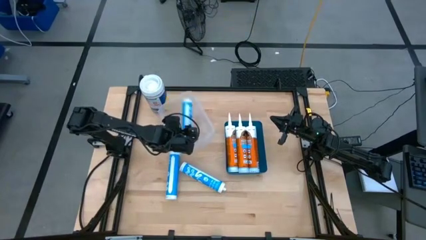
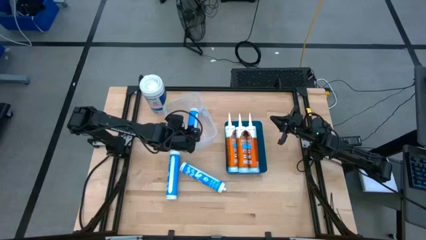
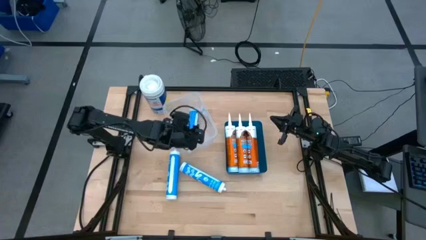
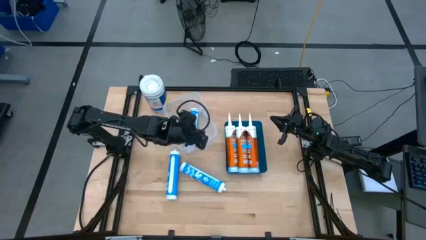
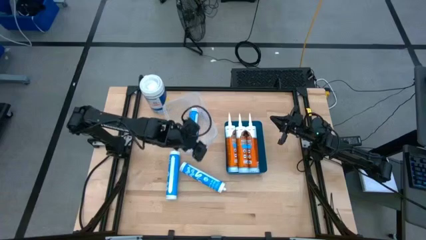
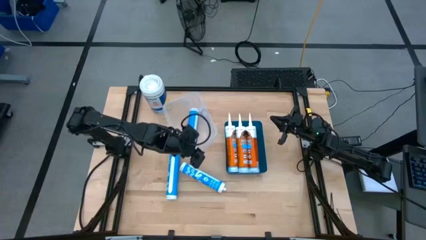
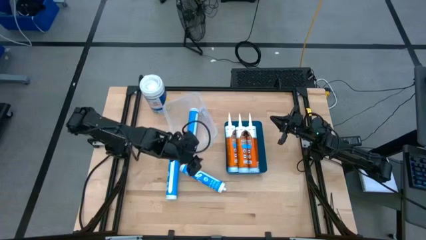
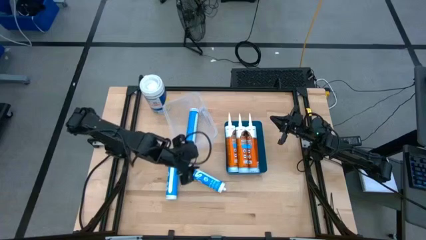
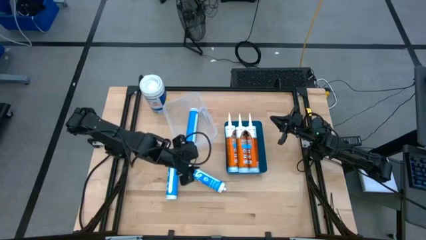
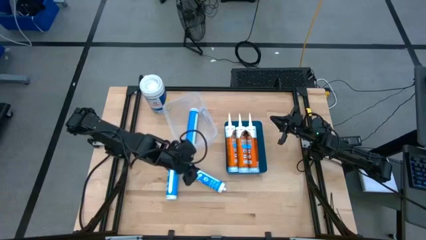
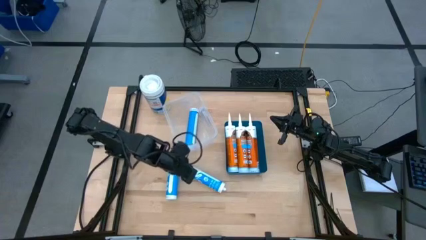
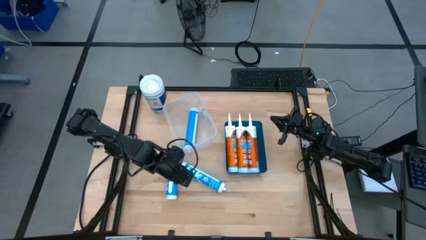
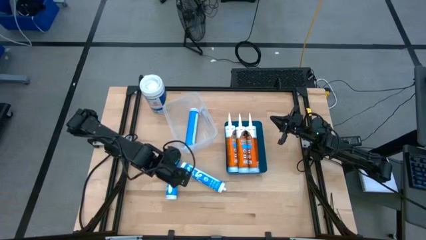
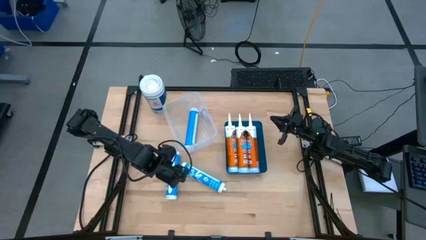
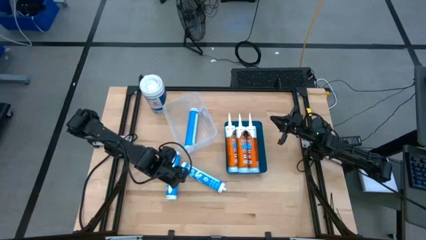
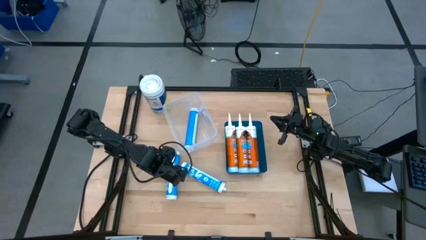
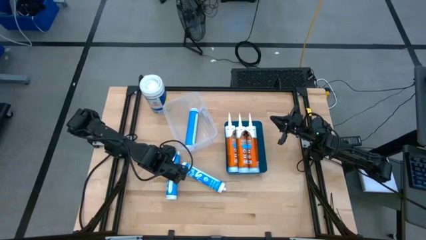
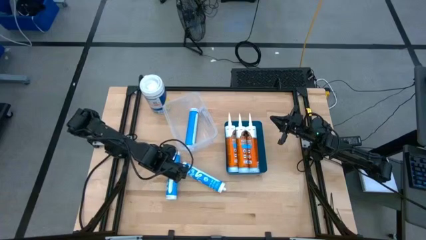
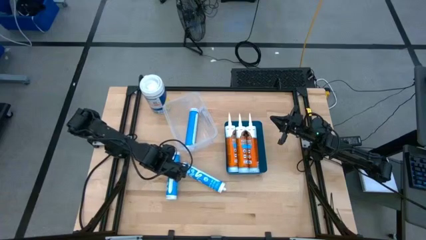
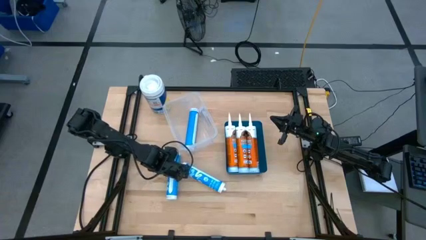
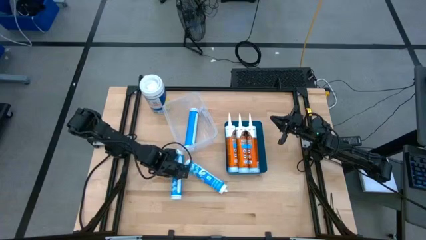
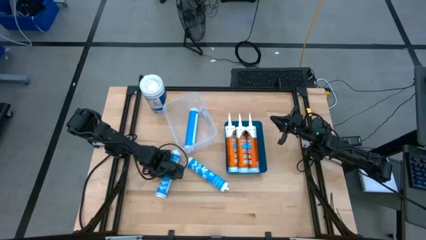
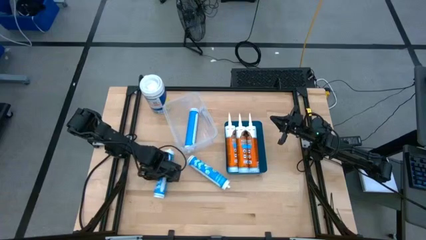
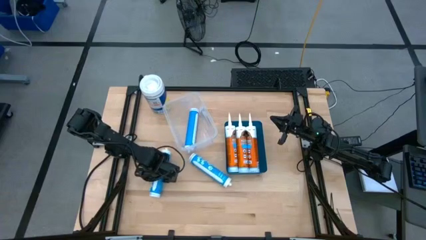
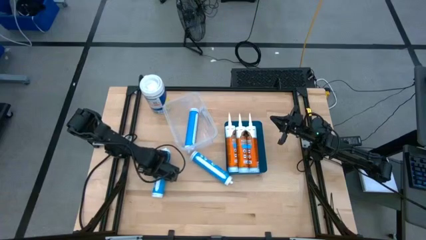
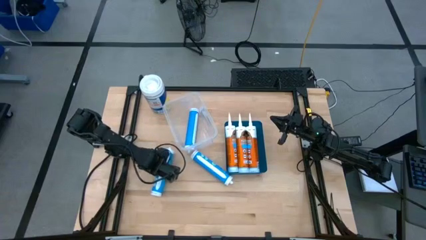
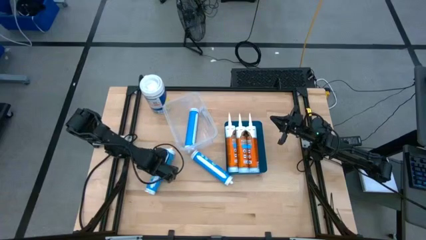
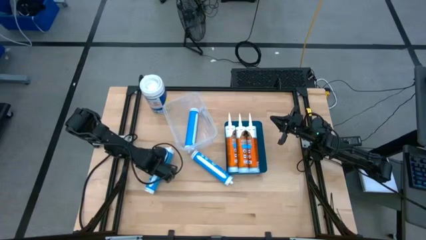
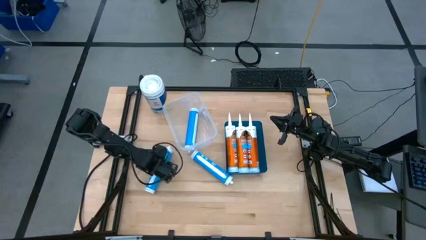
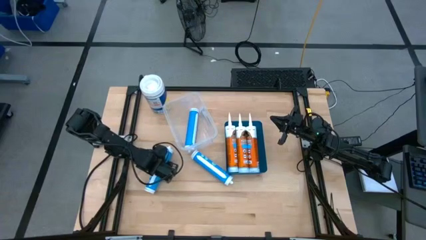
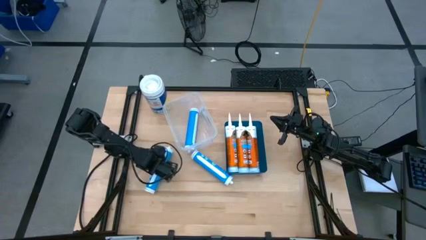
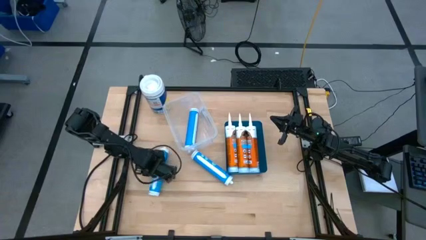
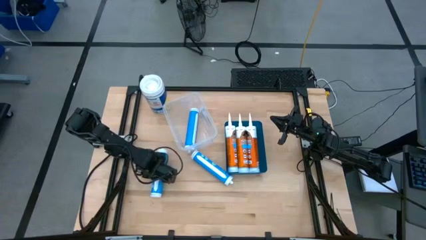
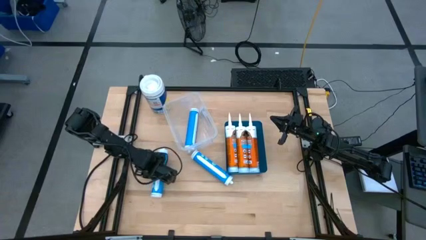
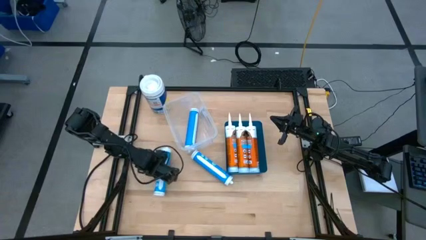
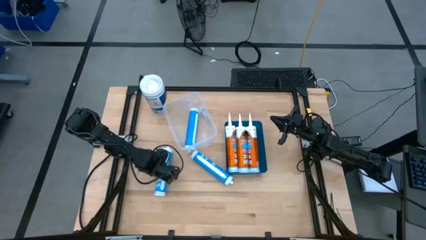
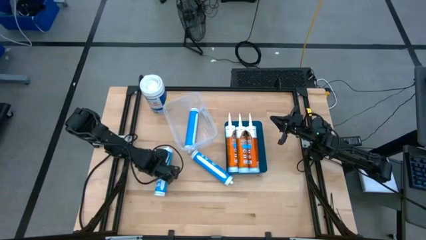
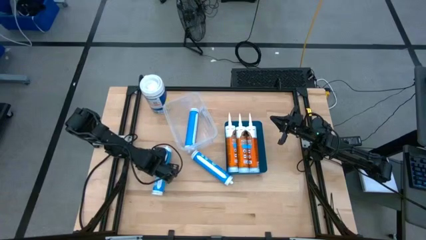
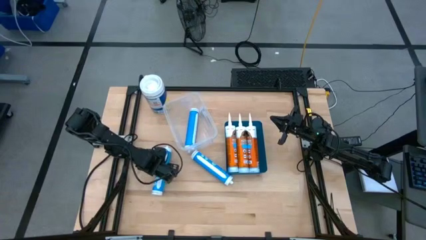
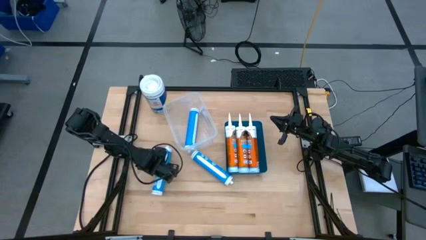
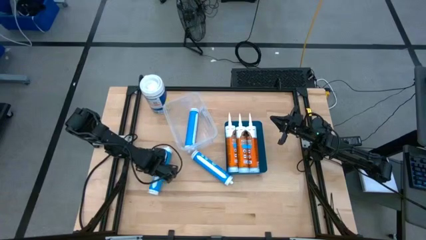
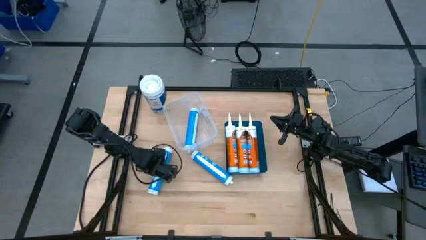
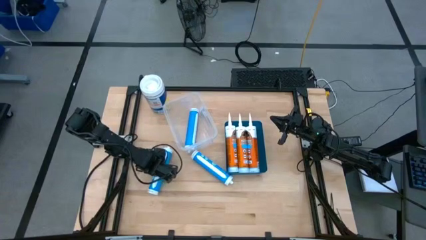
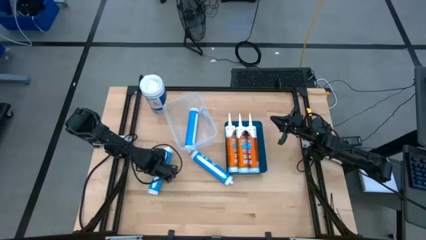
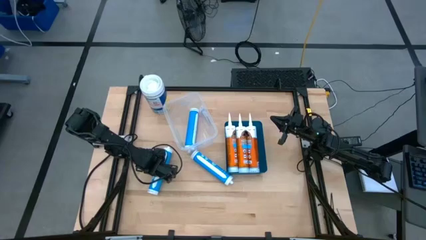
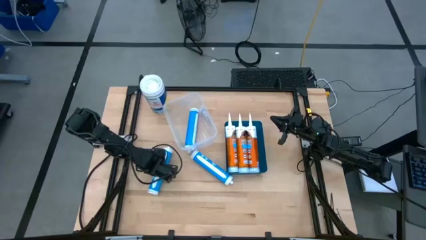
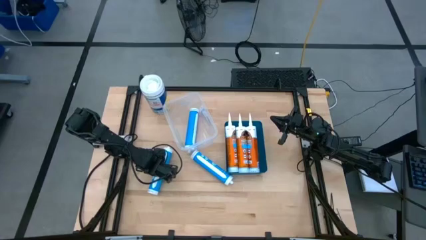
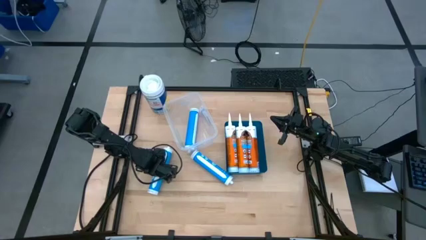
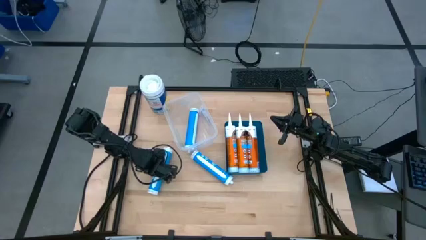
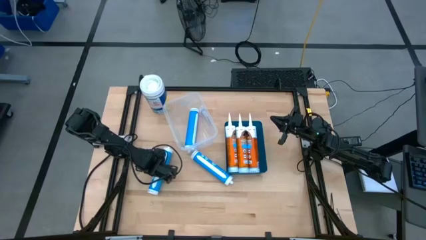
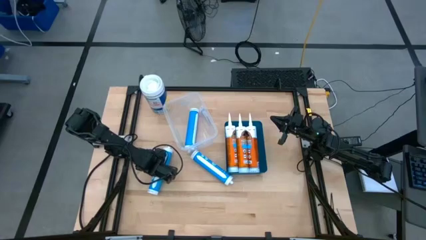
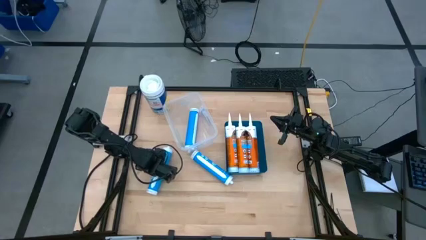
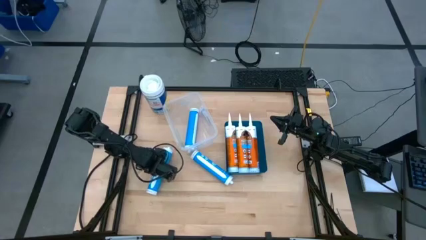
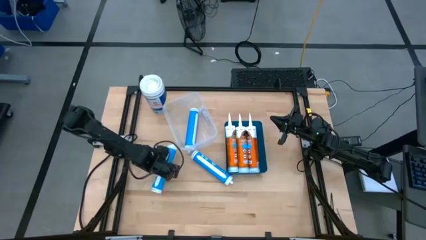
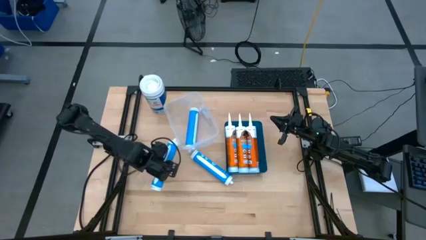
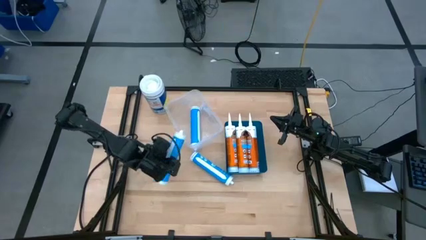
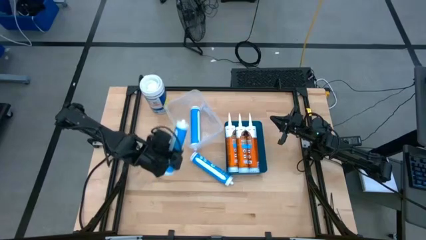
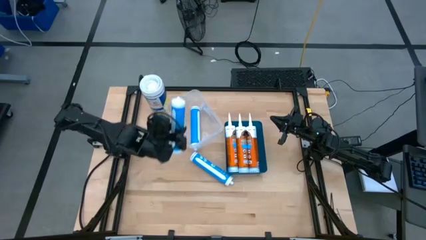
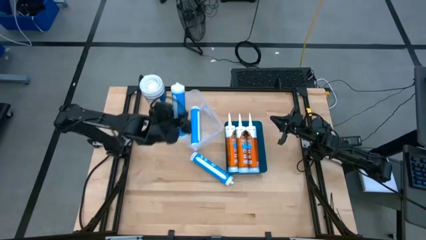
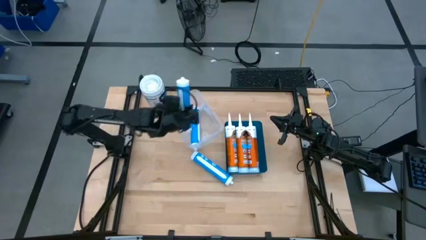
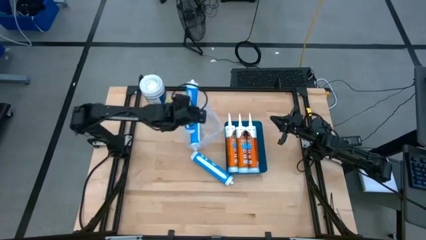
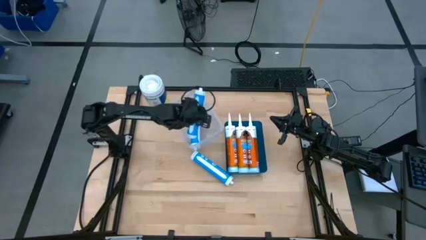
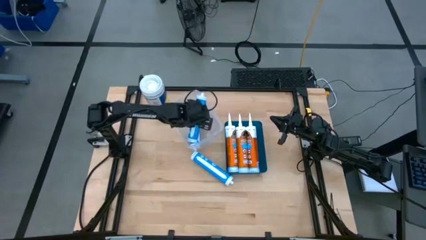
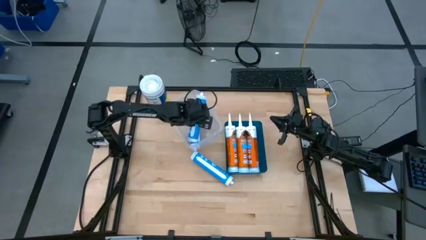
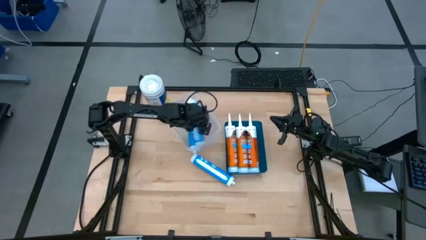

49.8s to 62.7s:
Task: Pick & place silicon tubes, Sealant and Lysol wipes
Put the left blue sealant into the transparent bin
